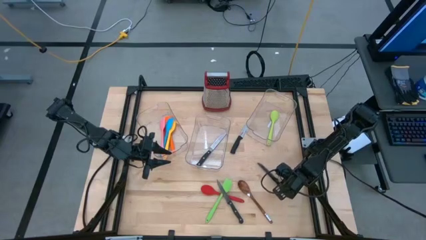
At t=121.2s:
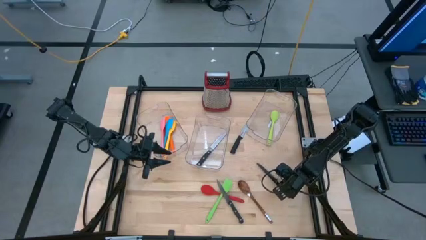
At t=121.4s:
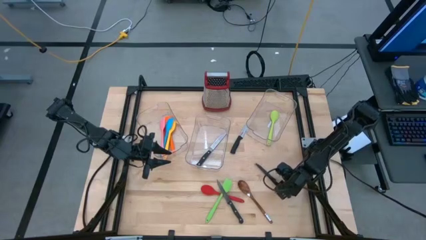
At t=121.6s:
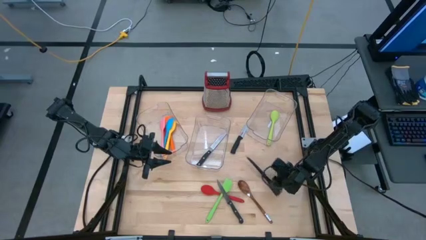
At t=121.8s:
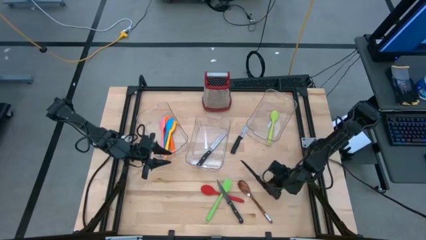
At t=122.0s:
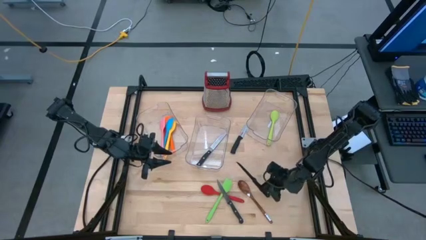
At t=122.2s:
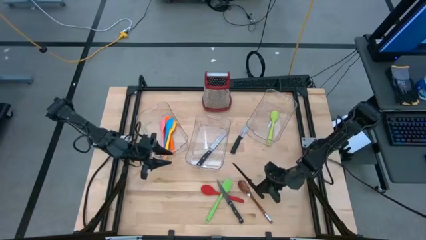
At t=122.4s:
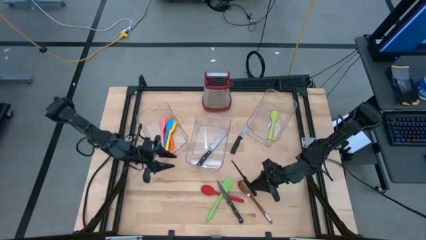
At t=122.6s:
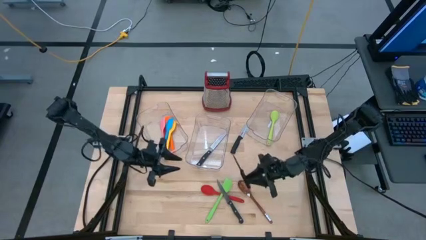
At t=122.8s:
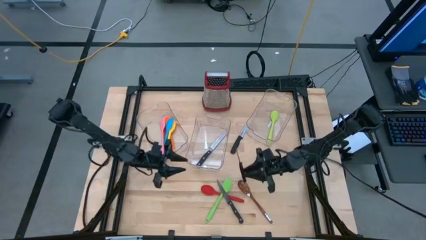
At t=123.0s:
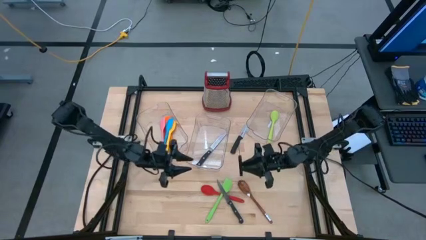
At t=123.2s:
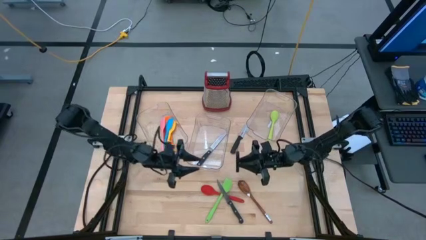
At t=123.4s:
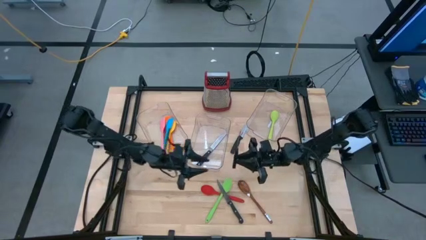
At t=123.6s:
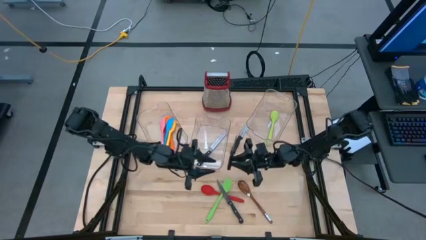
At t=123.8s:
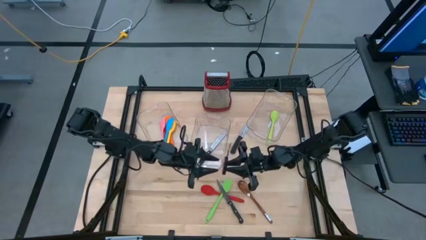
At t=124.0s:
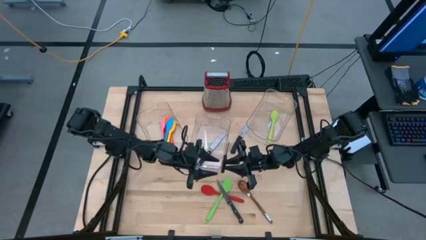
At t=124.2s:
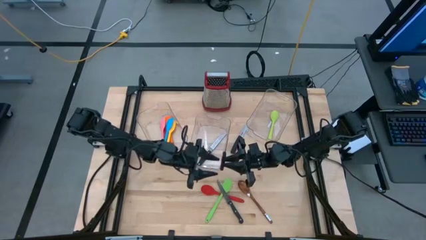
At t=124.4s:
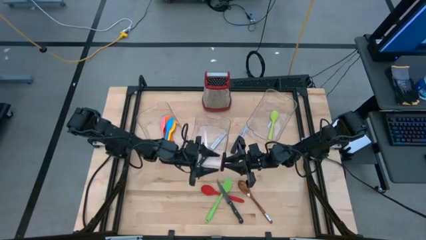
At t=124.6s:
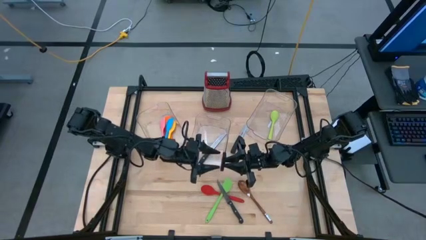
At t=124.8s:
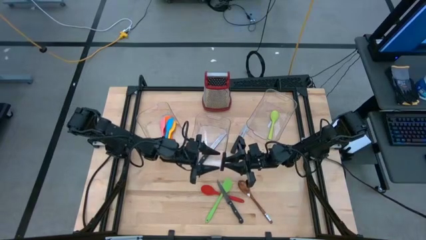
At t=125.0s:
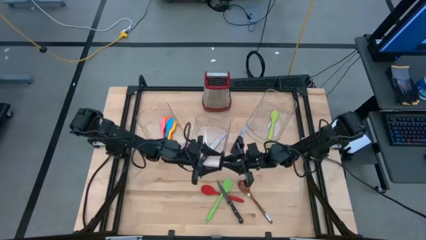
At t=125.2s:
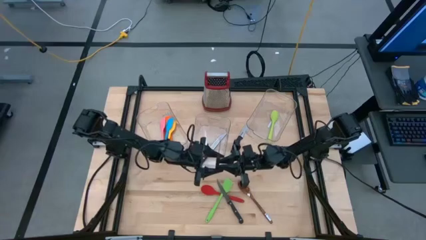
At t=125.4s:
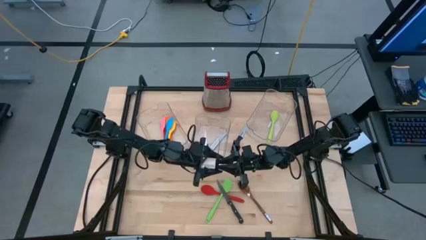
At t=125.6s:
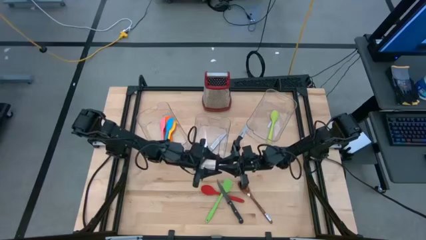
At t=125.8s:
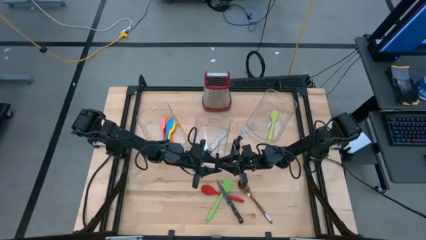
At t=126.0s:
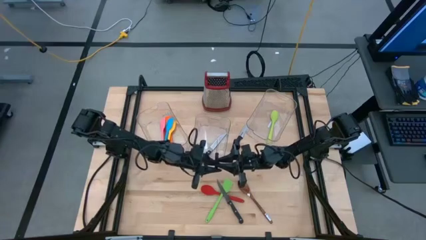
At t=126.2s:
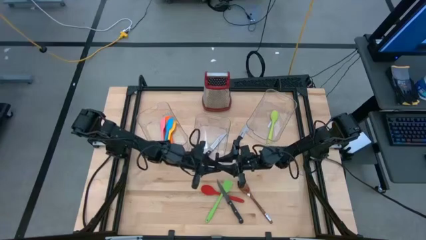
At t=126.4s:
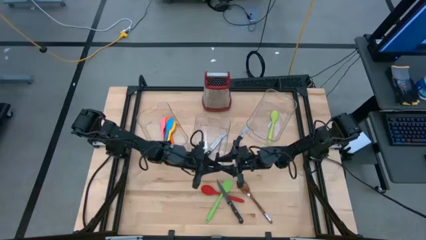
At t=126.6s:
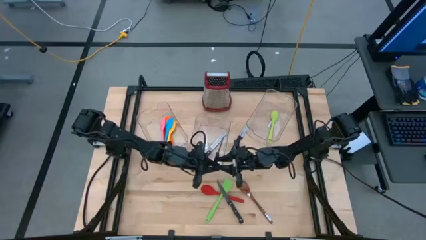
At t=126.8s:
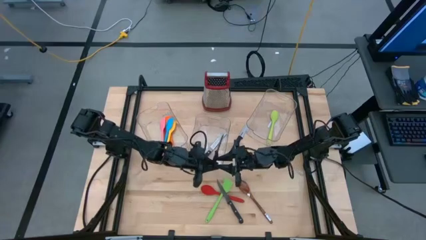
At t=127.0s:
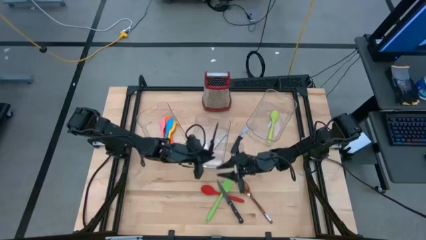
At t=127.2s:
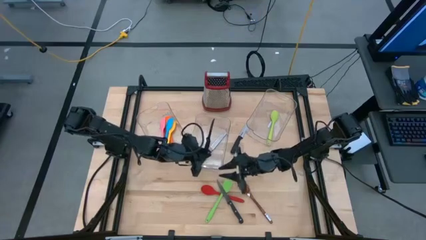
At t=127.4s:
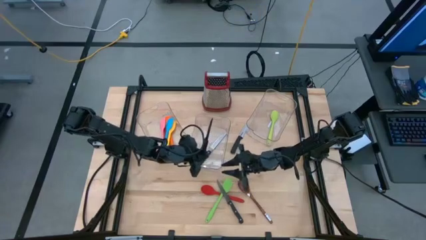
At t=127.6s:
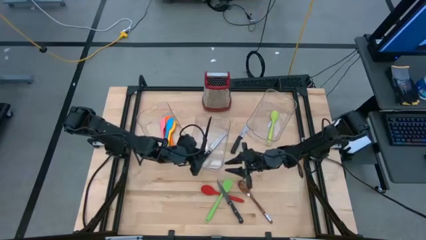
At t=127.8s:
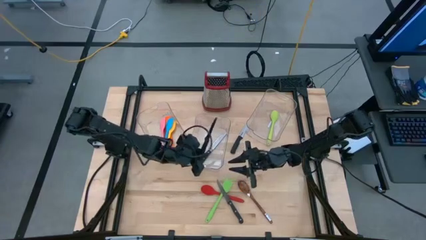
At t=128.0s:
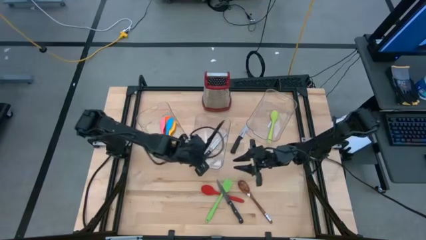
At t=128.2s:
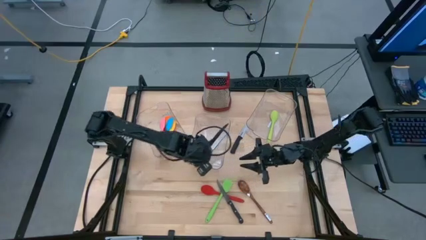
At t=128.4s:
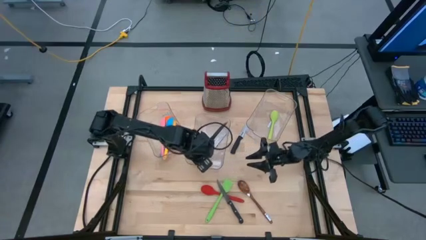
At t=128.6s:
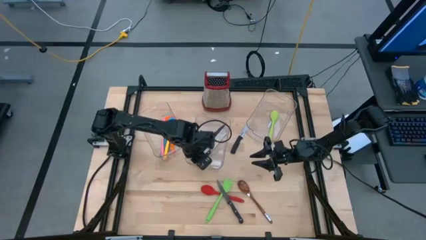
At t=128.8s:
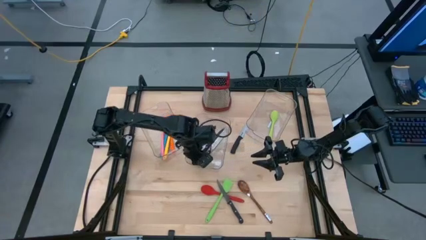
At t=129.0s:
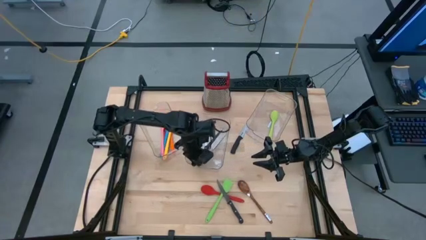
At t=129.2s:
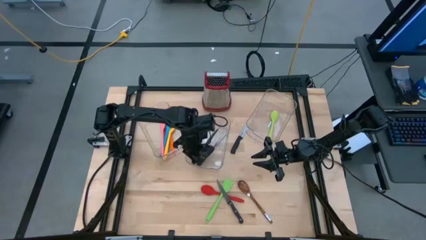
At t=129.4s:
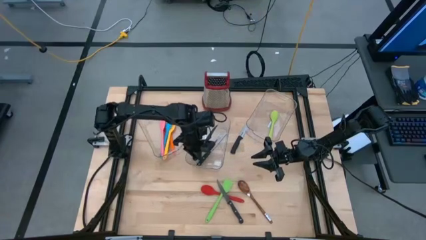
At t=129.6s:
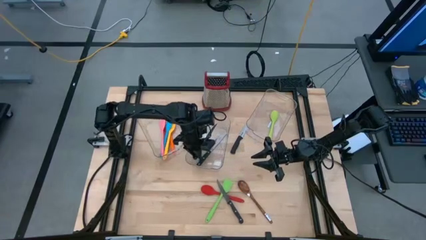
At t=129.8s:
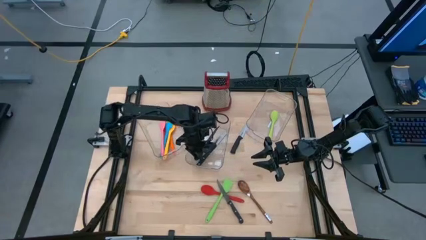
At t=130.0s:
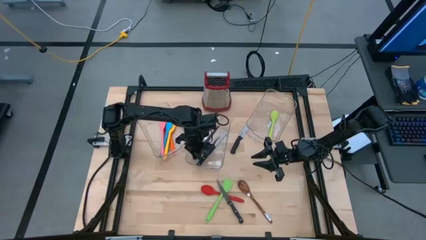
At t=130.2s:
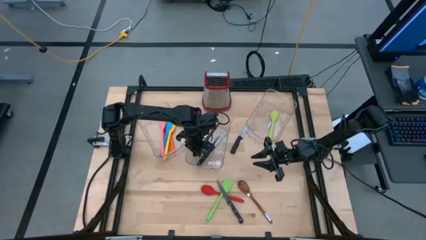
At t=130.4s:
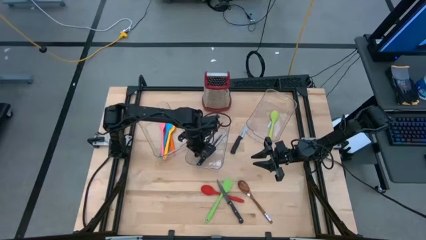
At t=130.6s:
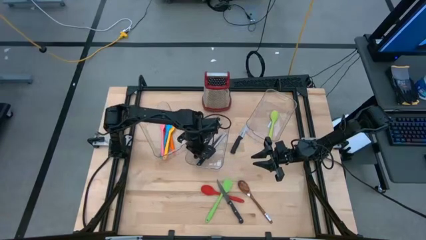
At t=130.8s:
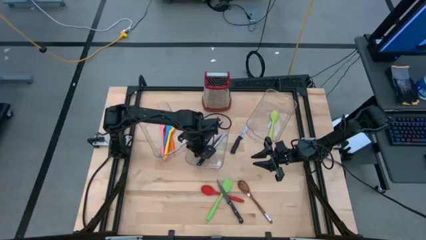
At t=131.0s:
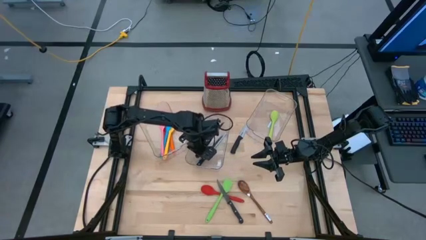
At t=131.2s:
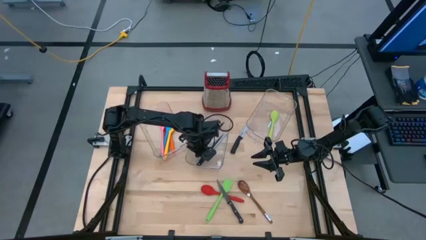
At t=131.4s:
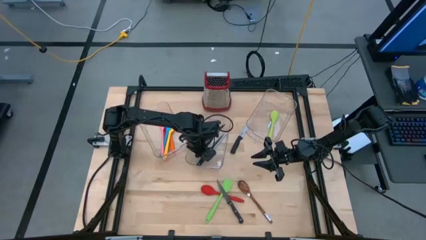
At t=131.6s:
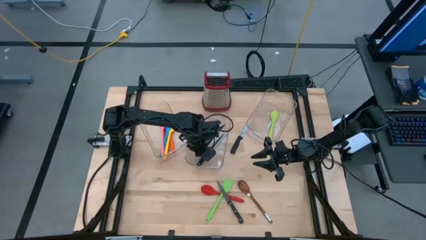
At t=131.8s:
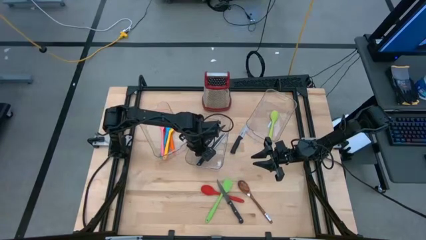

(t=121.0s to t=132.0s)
Task: Pick & Place Kitchen Items
Put the black knife into the middle transparent bin

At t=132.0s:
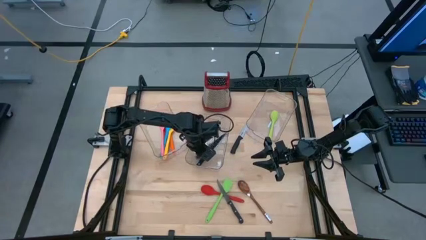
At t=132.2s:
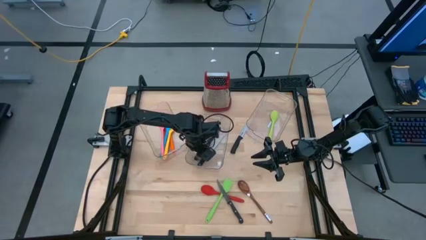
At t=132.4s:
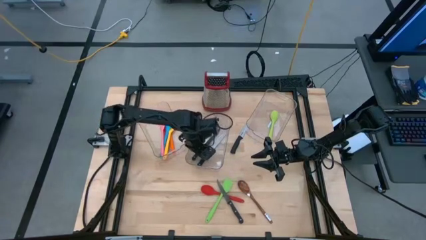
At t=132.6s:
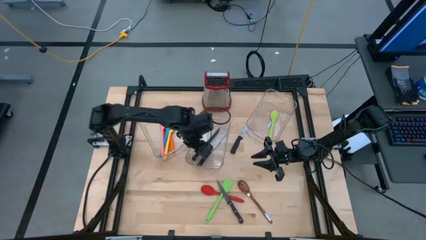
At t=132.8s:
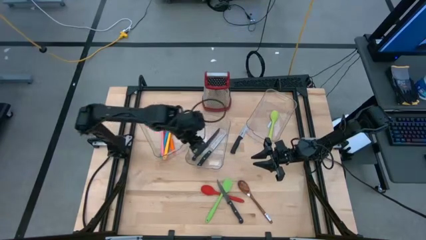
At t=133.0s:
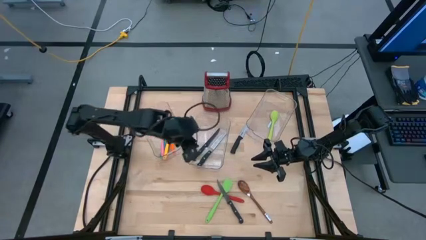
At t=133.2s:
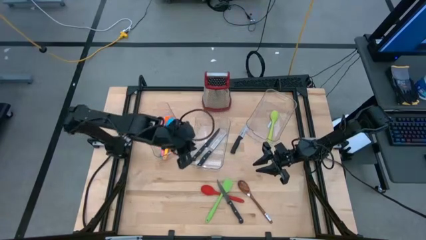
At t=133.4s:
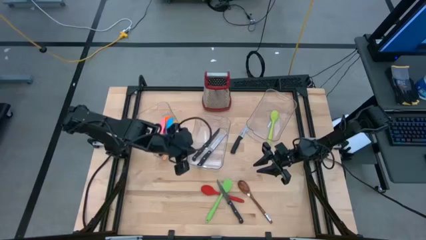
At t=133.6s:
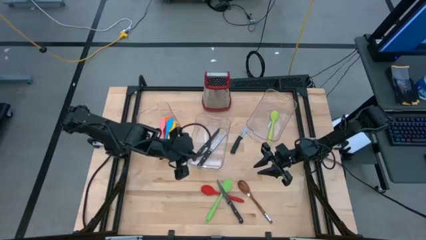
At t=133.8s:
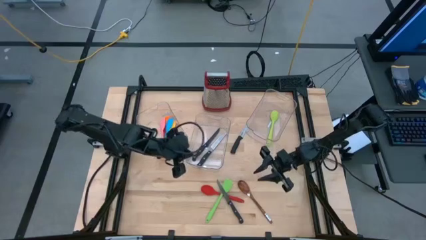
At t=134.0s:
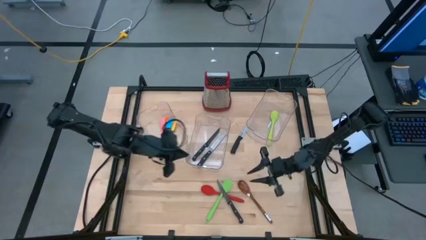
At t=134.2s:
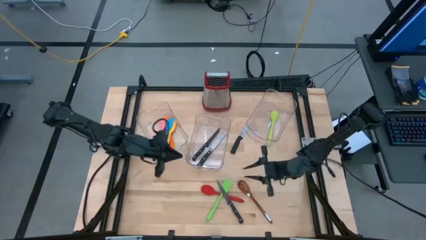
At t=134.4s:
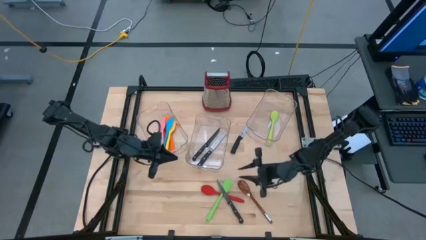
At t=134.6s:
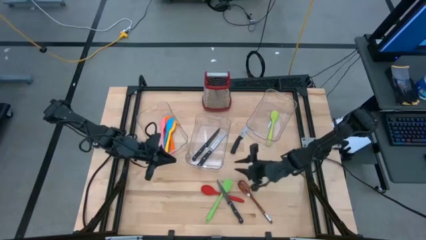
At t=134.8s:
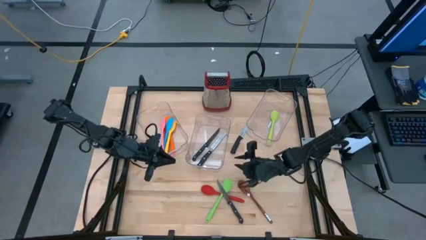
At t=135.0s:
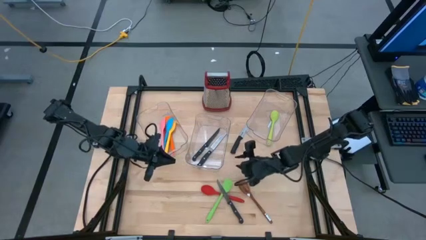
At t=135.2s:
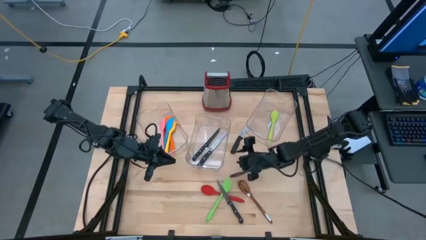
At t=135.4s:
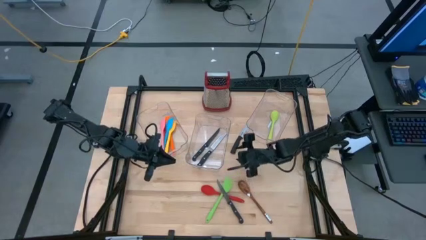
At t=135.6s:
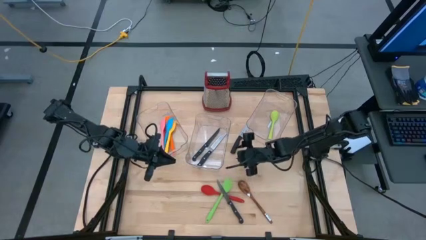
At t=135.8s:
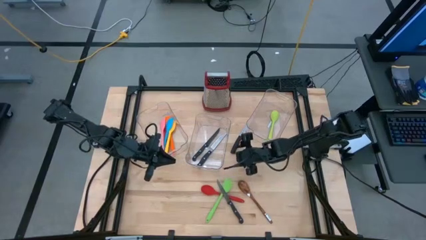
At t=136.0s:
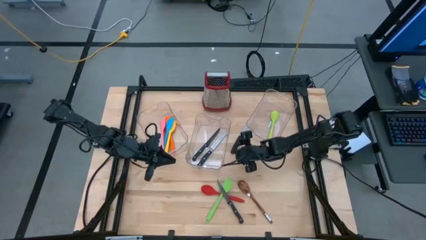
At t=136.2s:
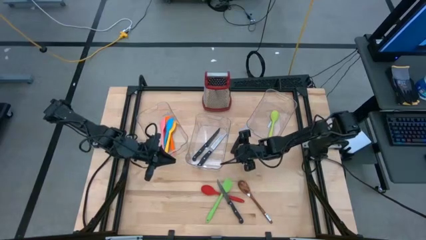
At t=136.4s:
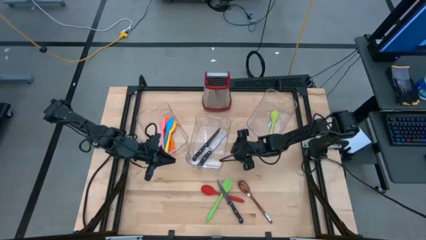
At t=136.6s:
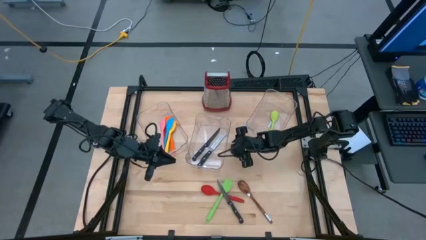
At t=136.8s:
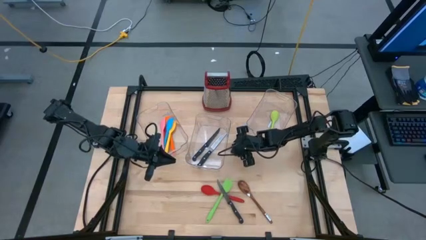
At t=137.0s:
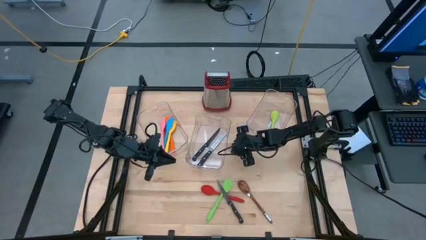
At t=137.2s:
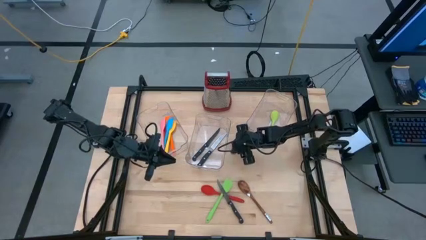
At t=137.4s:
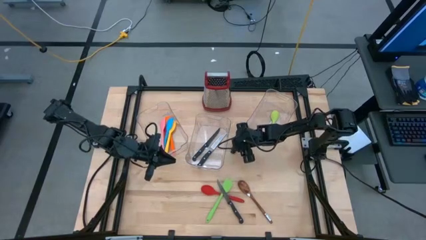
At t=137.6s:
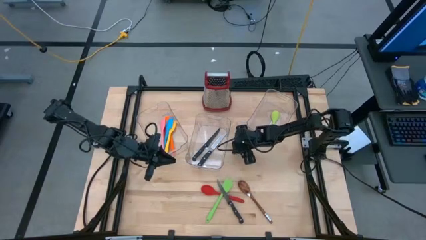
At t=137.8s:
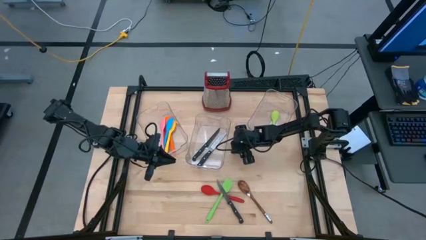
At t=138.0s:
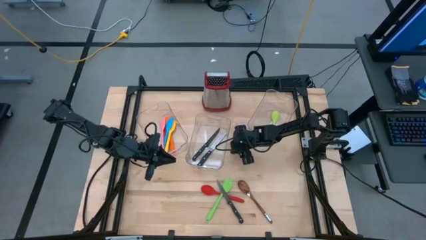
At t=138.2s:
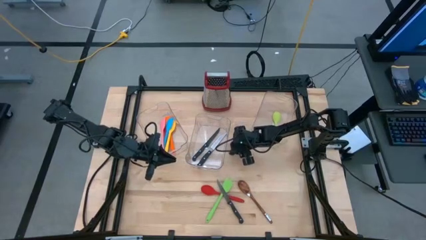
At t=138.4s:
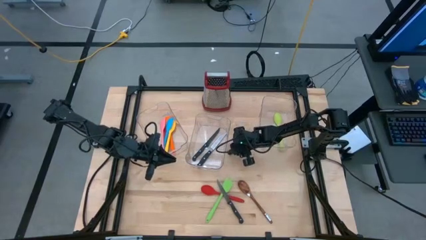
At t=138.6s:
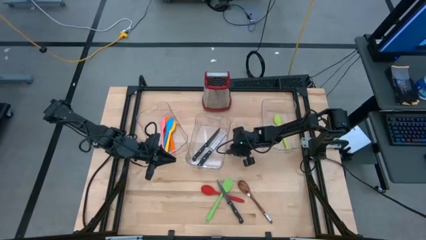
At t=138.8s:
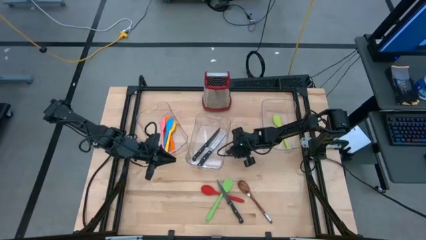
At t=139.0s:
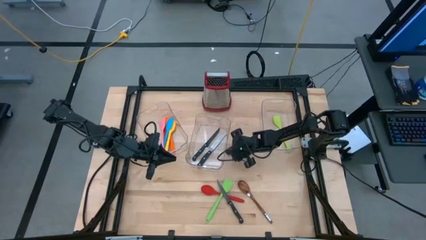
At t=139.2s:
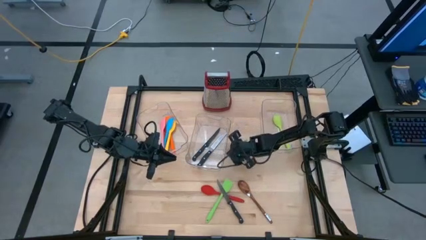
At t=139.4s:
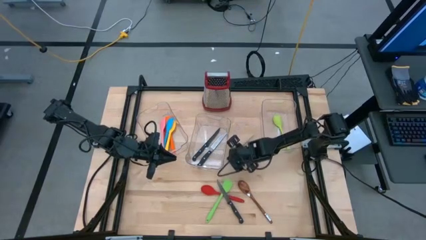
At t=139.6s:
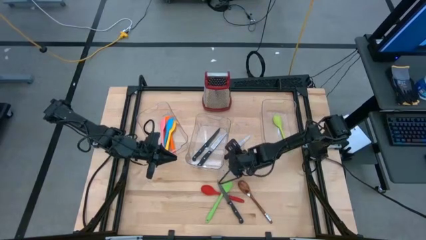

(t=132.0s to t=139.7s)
Put the black knife into the middle transparent bin
